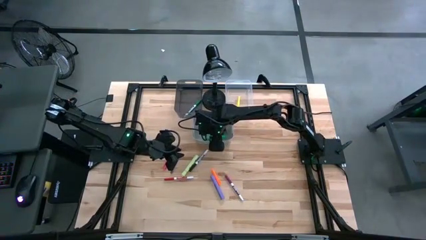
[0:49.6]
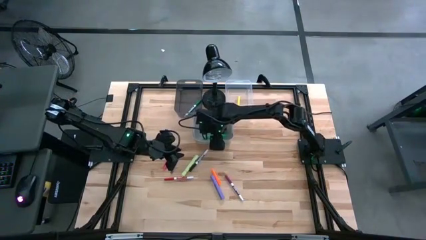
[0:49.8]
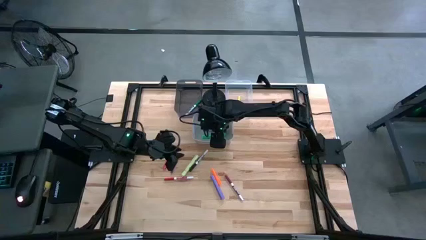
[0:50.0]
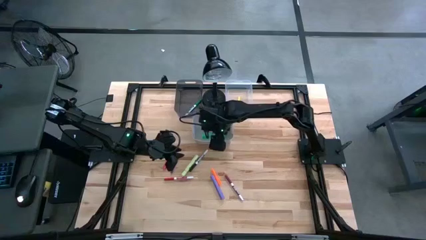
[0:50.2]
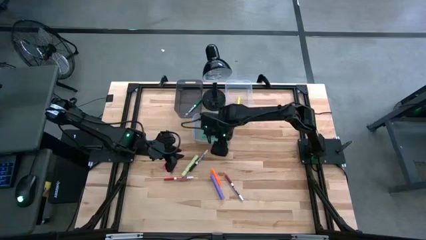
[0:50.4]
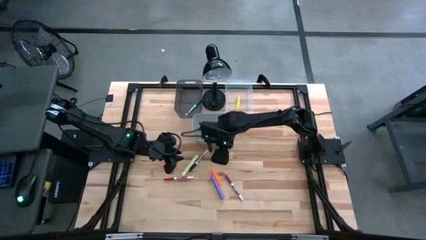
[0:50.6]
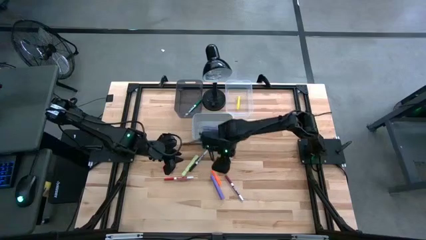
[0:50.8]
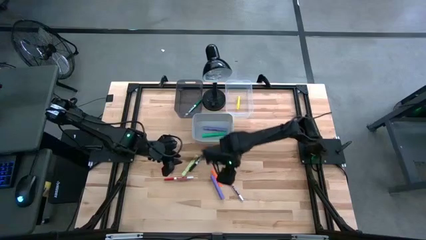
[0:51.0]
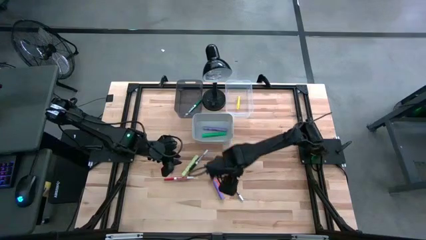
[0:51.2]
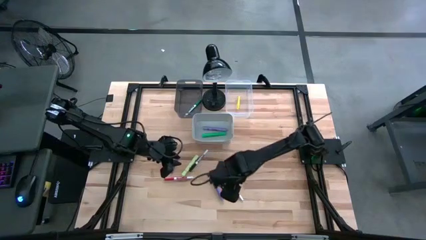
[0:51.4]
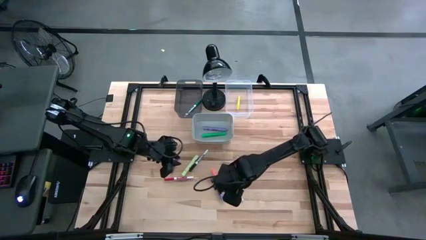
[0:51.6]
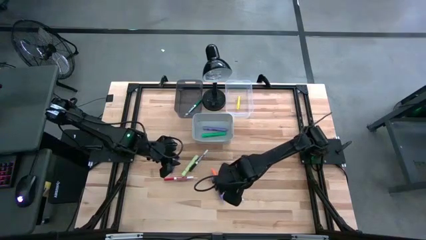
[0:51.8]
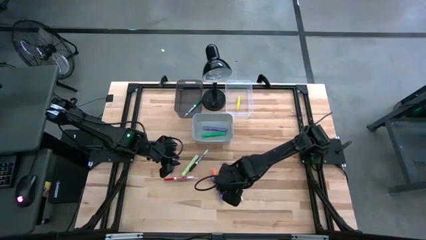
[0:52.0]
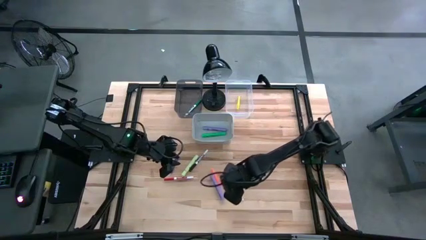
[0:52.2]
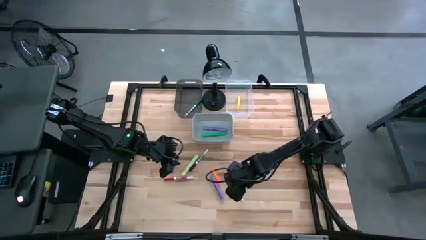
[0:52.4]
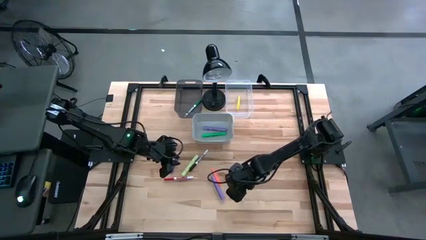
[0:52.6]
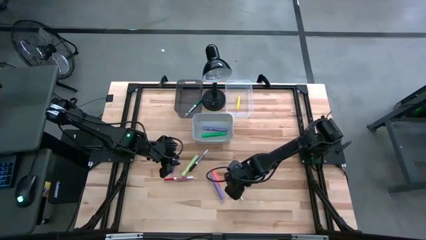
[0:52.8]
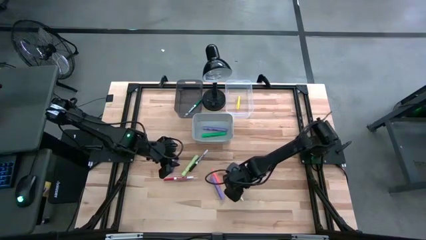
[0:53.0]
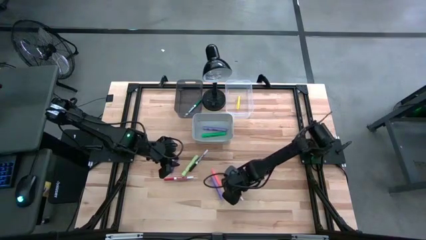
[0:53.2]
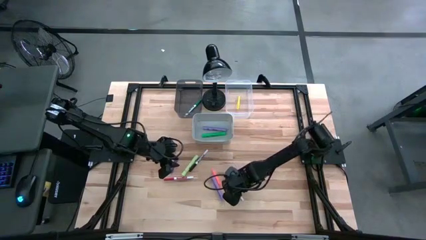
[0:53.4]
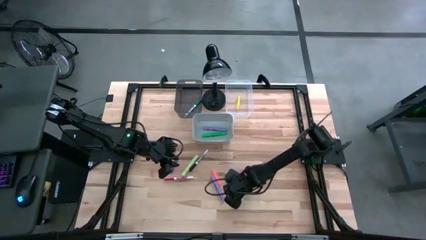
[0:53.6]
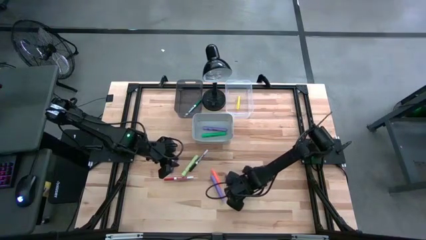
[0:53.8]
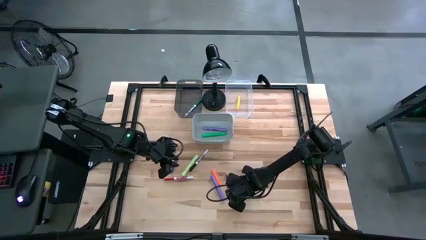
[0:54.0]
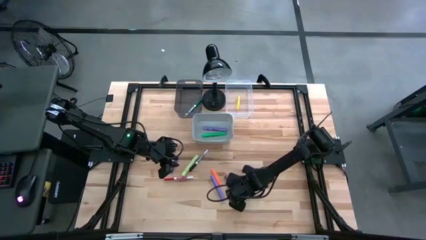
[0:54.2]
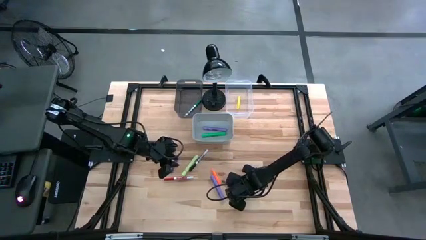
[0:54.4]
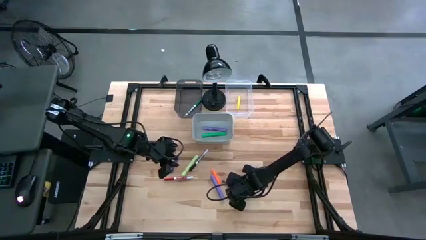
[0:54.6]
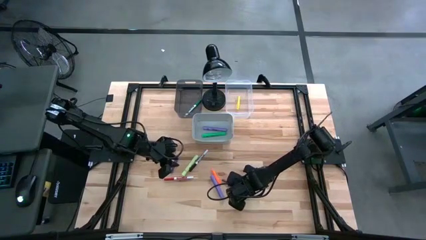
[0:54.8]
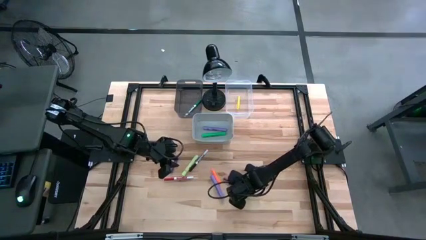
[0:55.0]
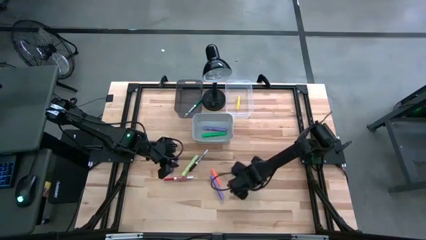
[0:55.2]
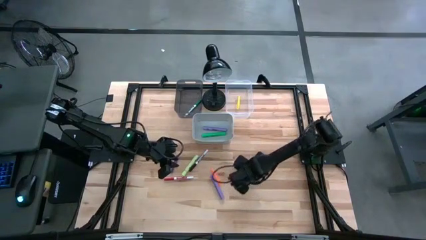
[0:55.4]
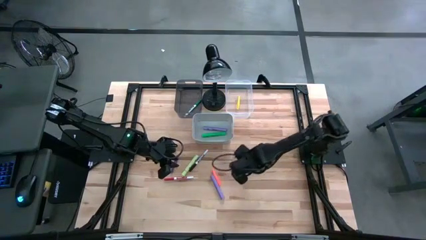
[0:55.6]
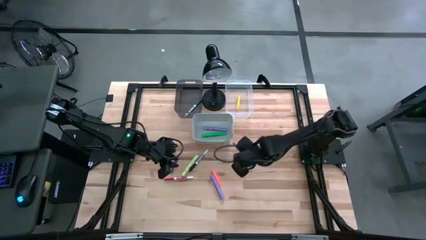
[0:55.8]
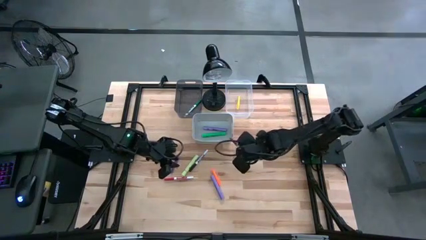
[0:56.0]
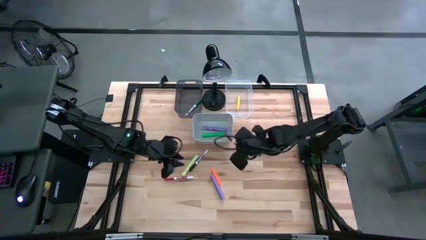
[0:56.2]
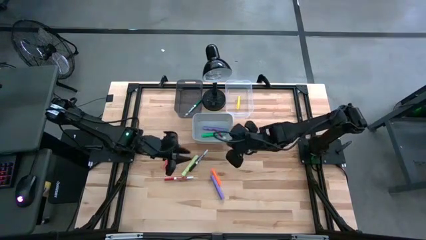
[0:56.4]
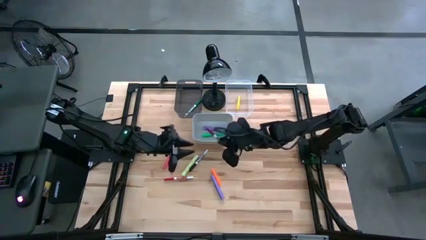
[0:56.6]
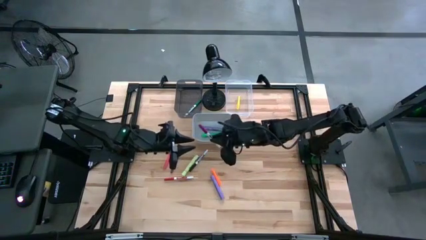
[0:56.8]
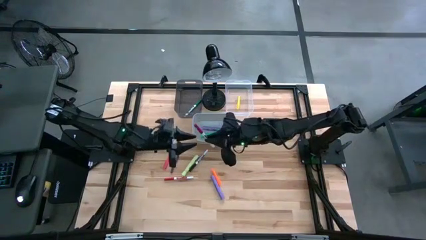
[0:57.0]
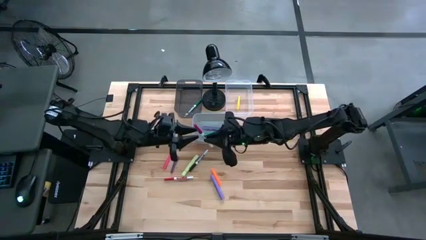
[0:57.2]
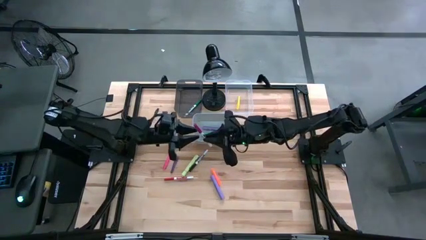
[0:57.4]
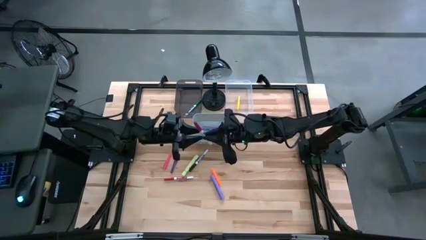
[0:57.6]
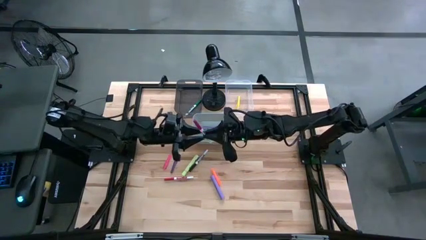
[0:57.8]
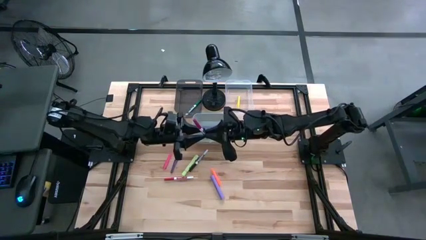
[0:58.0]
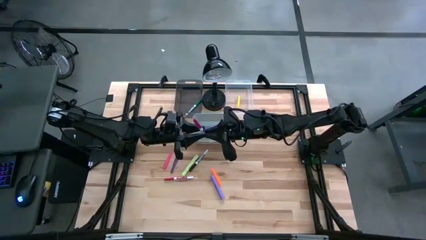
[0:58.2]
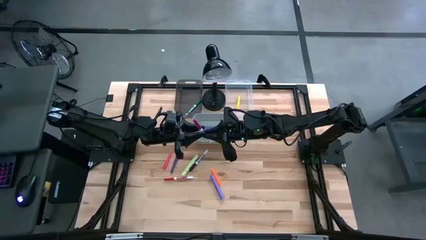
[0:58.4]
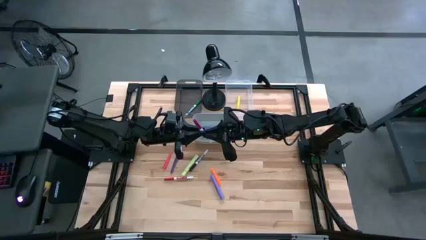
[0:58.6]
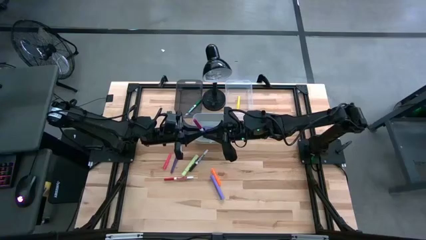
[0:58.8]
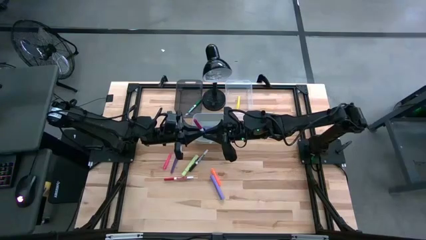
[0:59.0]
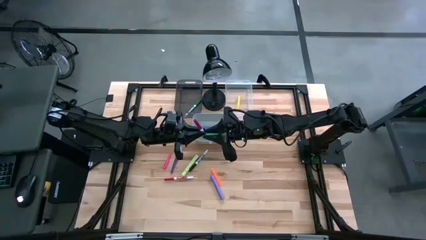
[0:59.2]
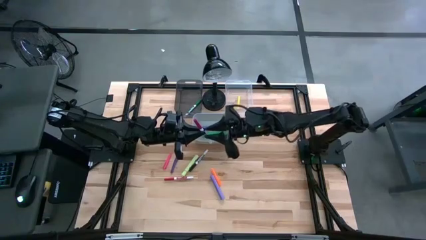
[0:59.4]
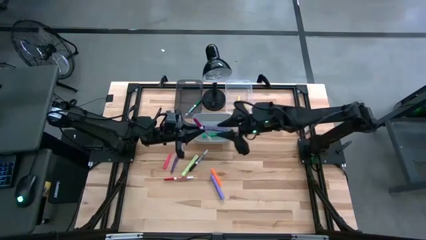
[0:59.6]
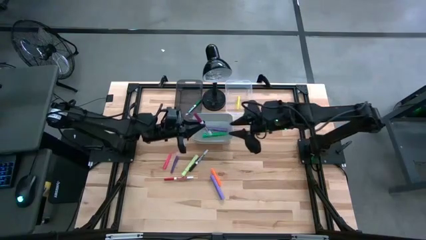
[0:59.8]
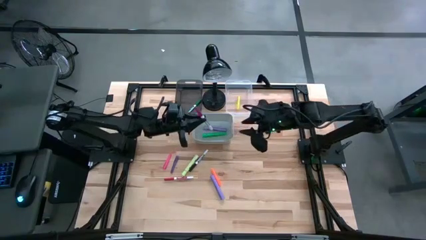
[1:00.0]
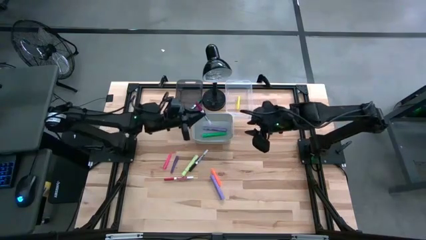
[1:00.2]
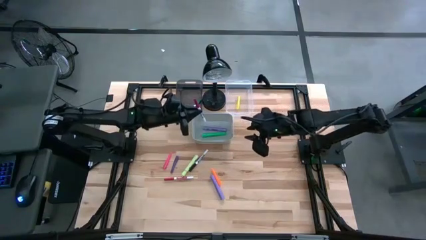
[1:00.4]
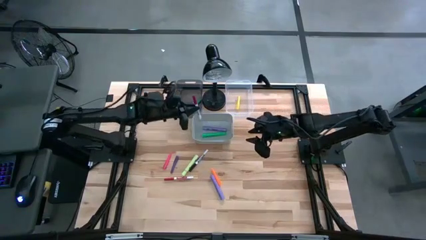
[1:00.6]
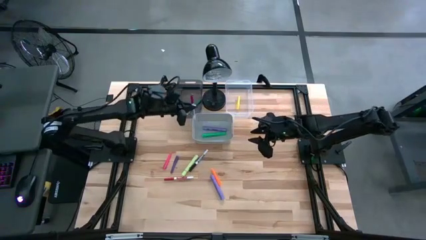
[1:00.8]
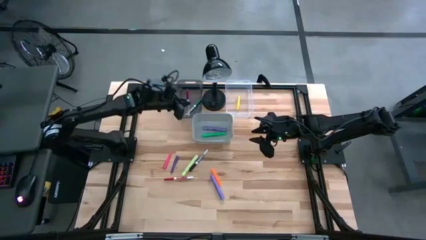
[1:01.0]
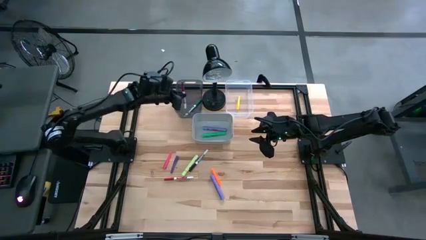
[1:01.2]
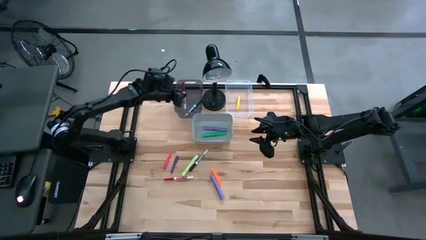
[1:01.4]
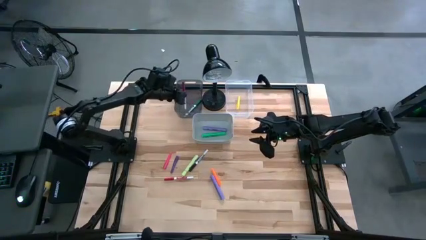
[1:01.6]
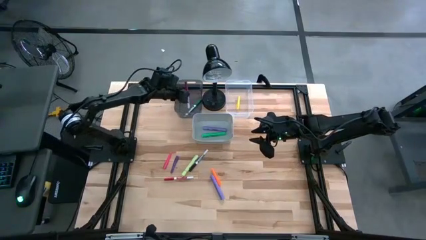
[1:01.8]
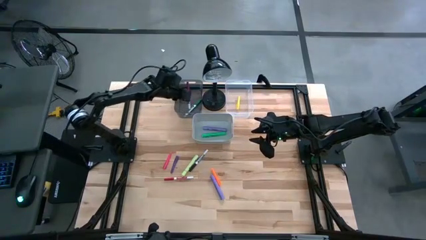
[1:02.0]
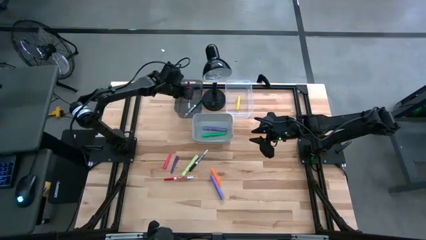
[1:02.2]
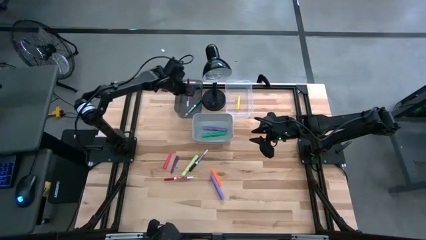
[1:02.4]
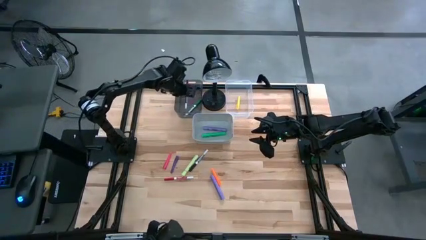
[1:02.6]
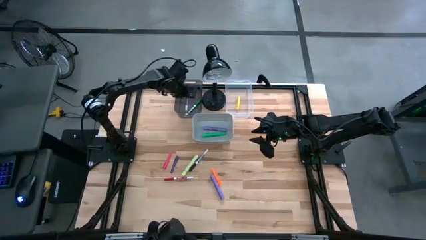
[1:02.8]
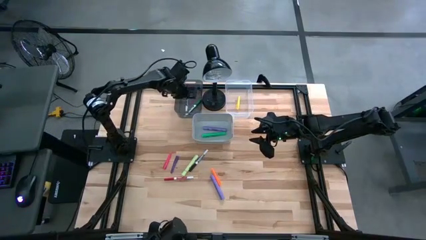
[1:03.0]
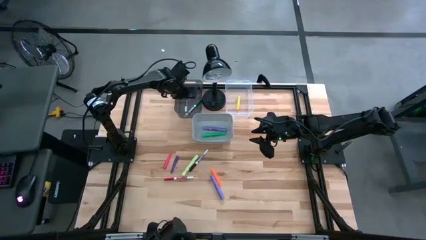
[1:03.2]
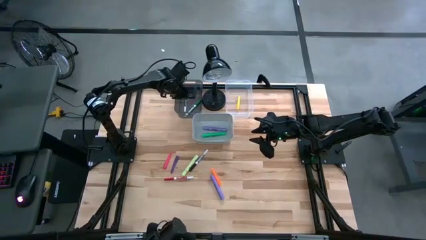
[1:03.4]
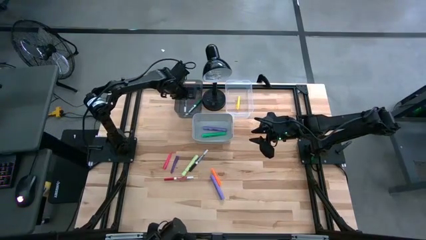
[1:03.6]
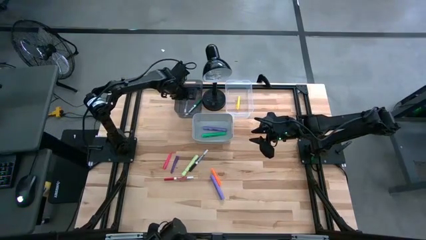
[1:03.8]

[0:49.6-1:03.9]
Task: Pick & Place Markers
Put the medium maroon marker into the black bin
